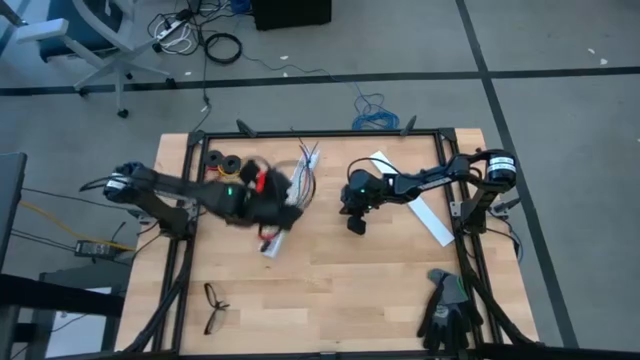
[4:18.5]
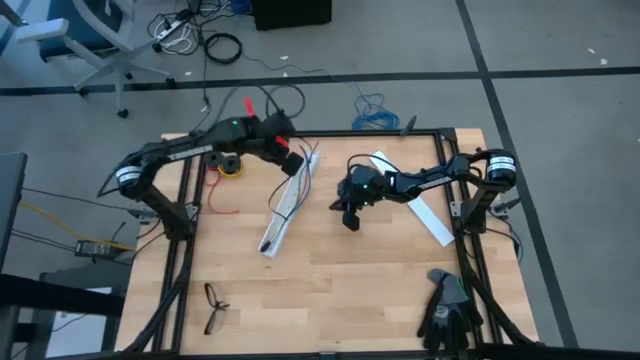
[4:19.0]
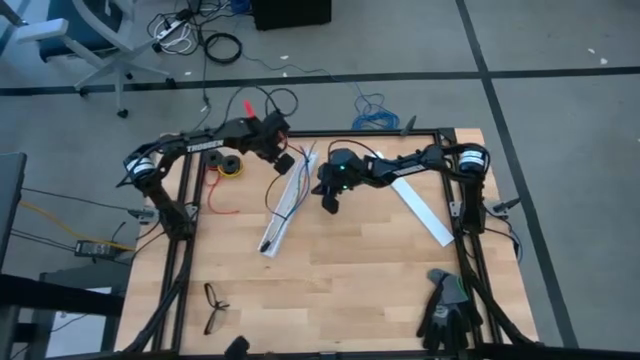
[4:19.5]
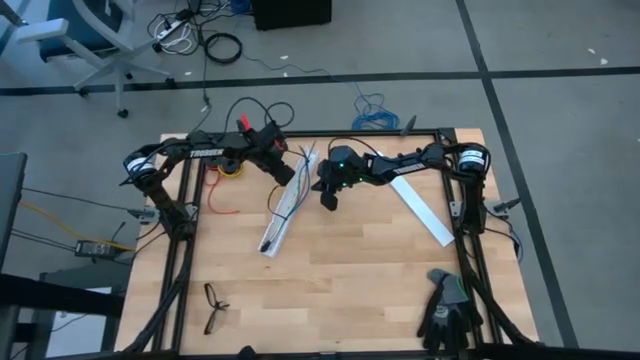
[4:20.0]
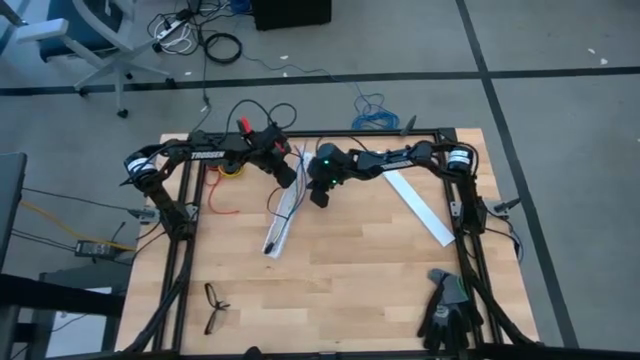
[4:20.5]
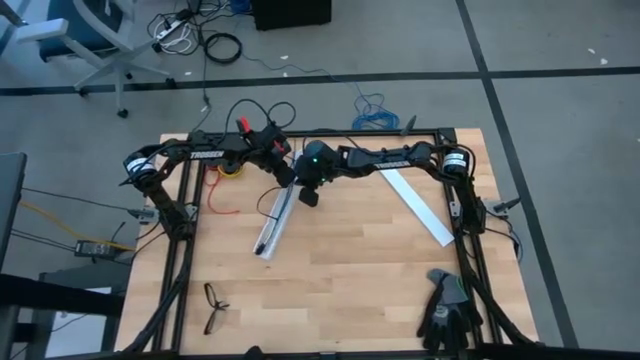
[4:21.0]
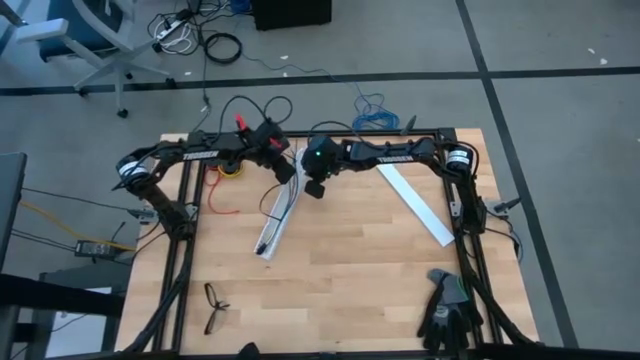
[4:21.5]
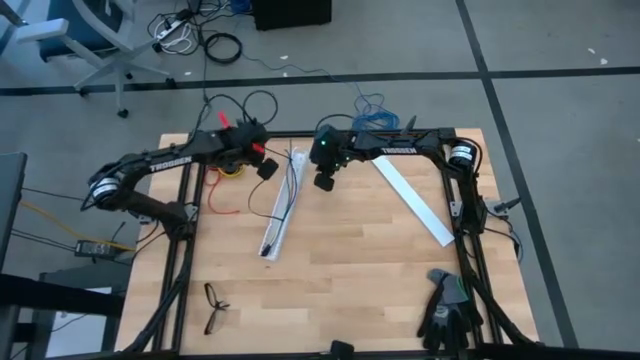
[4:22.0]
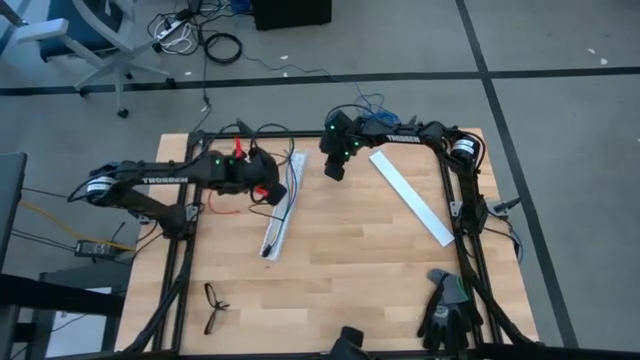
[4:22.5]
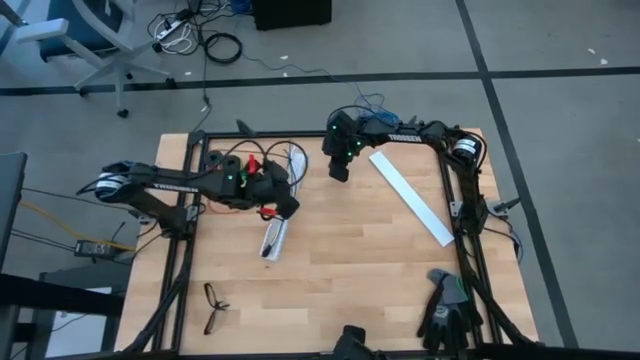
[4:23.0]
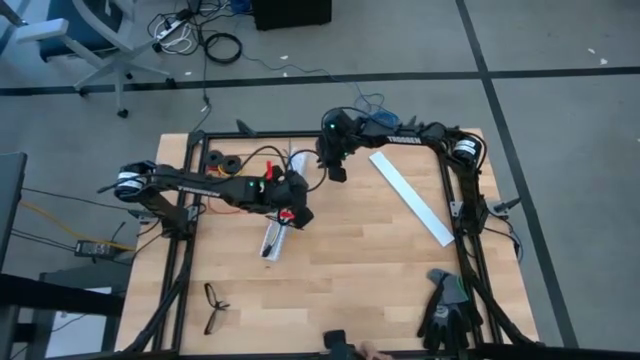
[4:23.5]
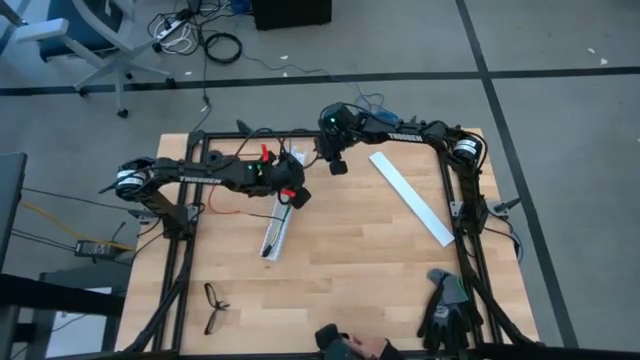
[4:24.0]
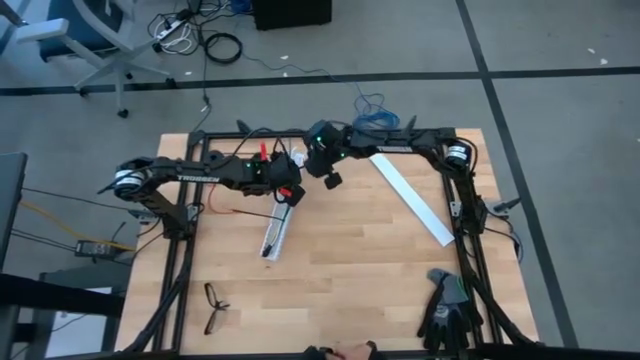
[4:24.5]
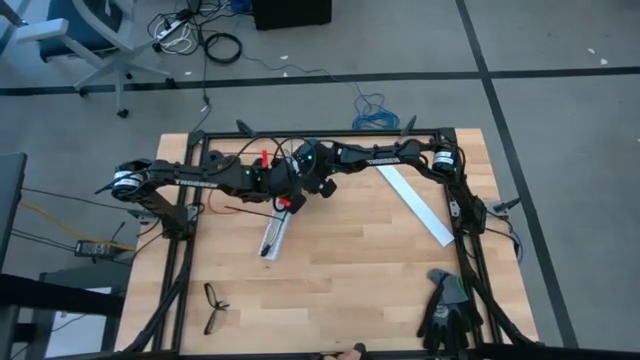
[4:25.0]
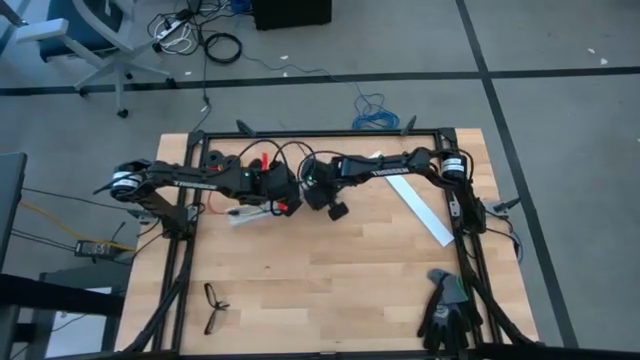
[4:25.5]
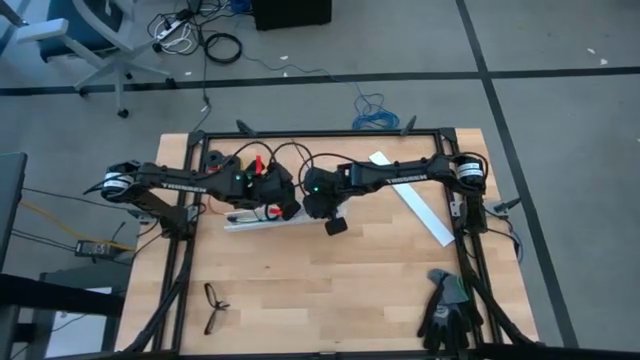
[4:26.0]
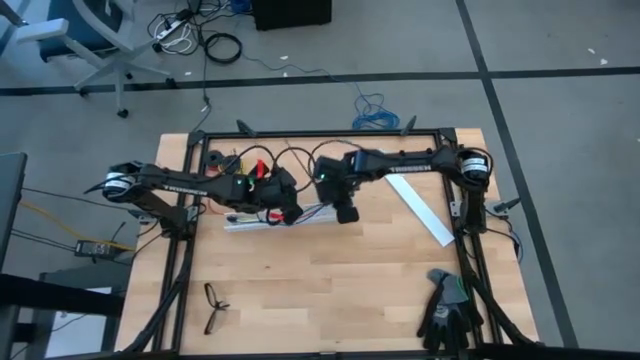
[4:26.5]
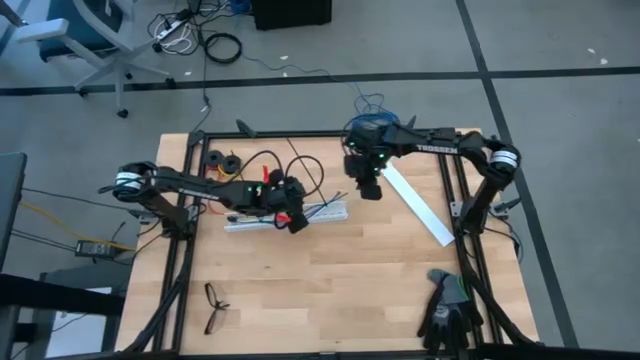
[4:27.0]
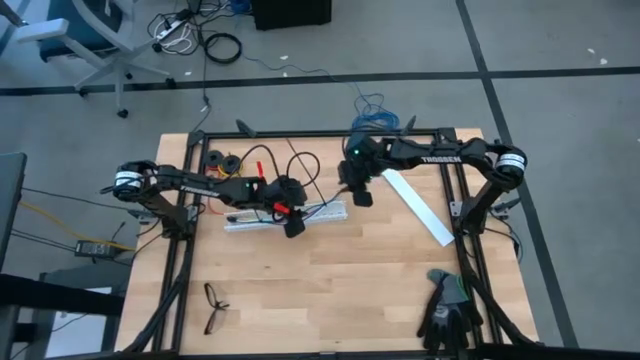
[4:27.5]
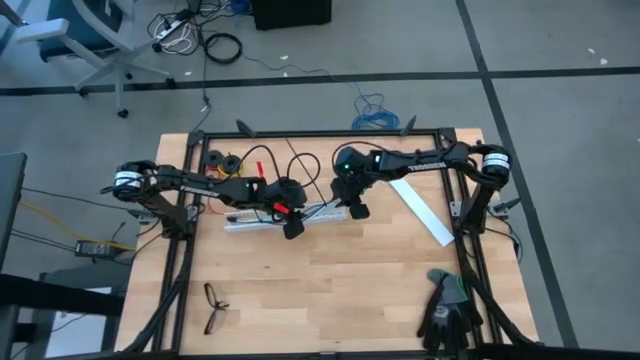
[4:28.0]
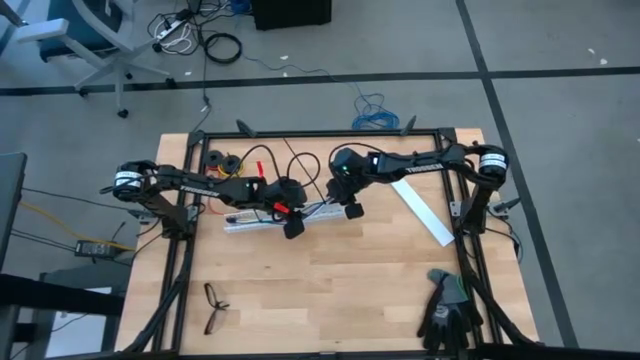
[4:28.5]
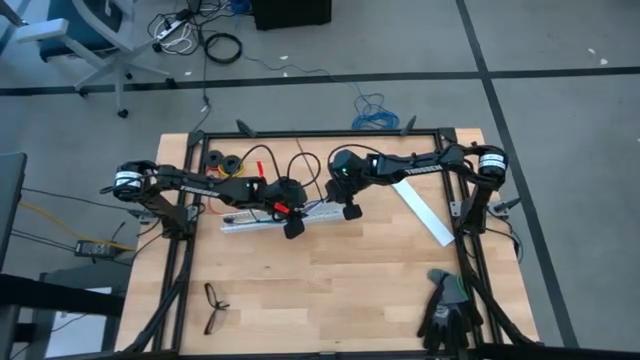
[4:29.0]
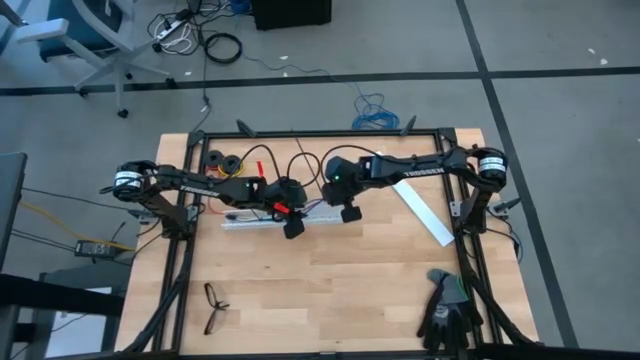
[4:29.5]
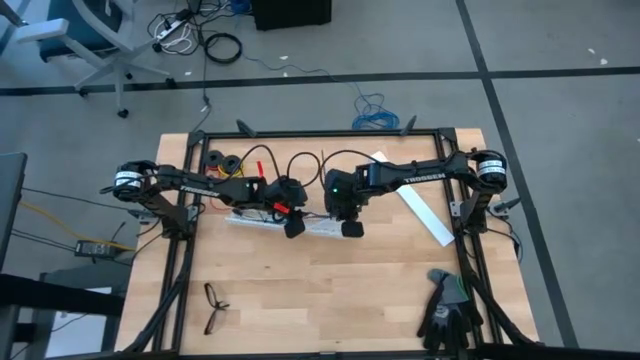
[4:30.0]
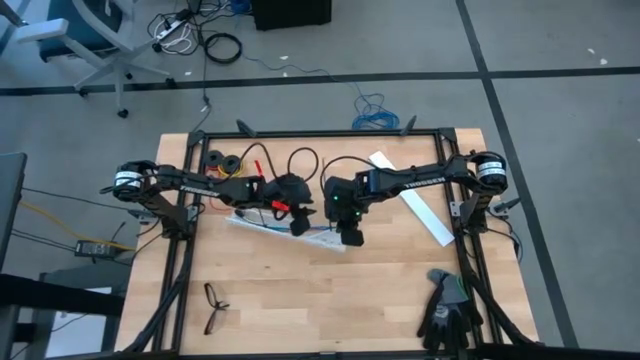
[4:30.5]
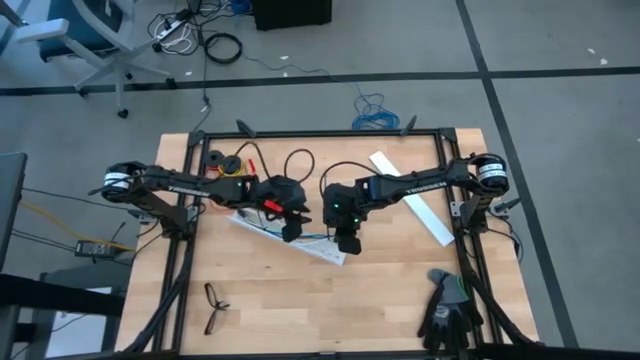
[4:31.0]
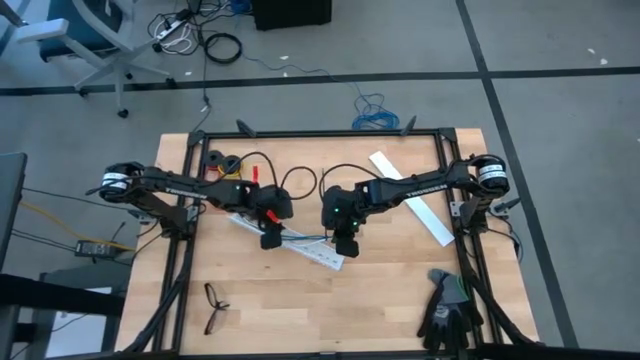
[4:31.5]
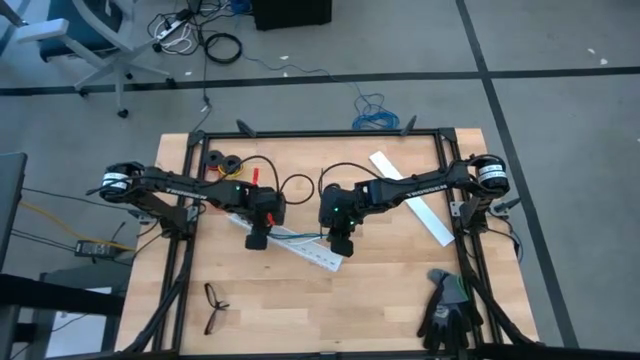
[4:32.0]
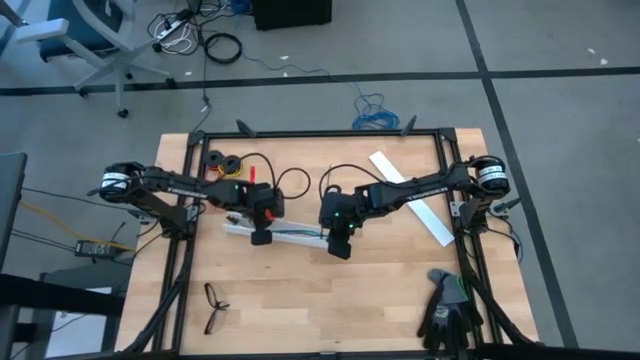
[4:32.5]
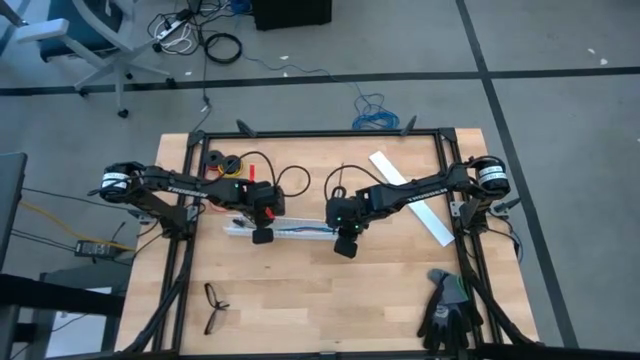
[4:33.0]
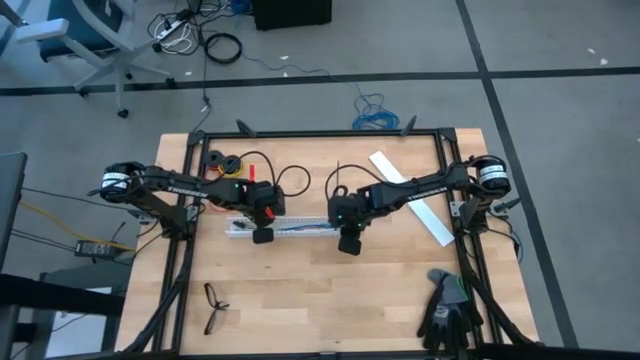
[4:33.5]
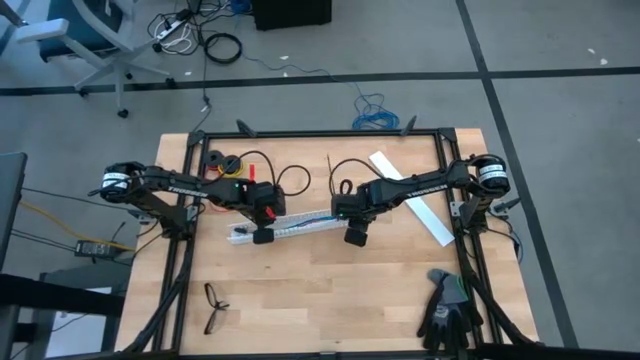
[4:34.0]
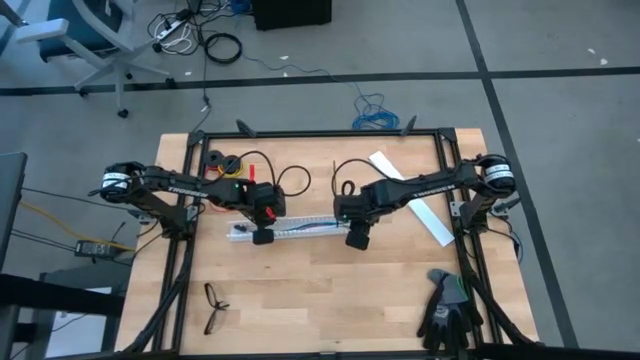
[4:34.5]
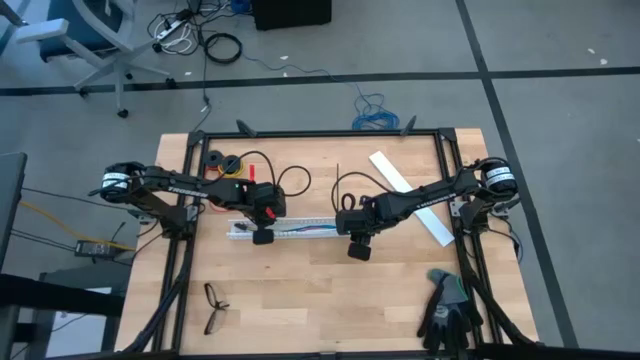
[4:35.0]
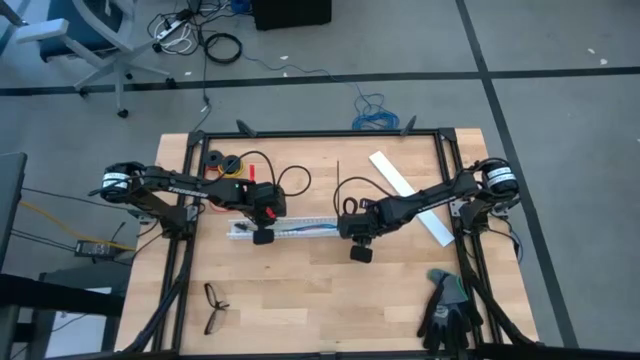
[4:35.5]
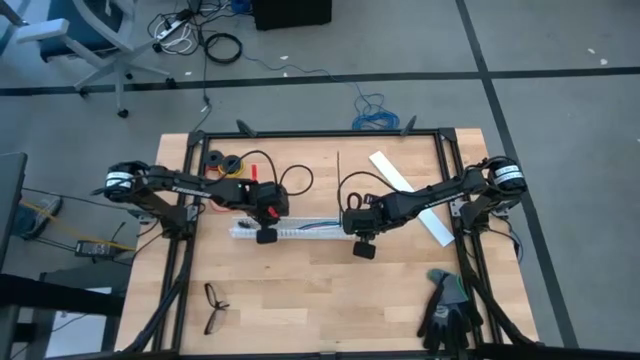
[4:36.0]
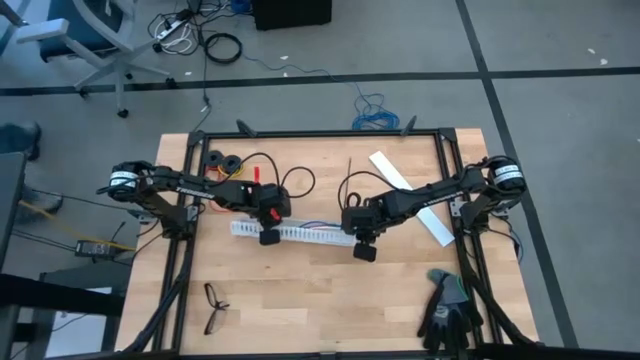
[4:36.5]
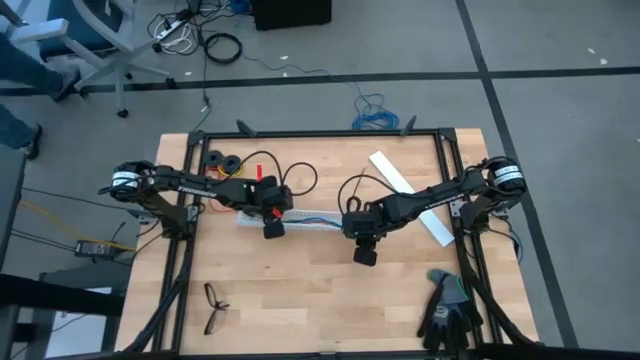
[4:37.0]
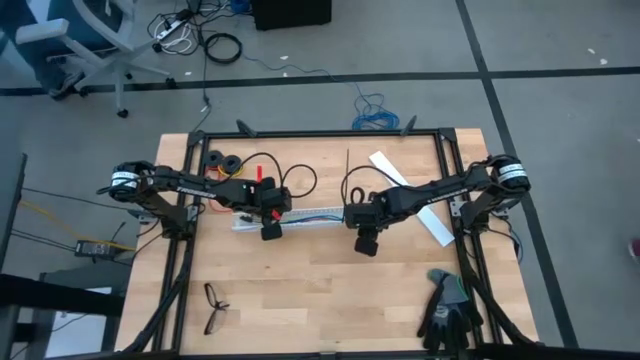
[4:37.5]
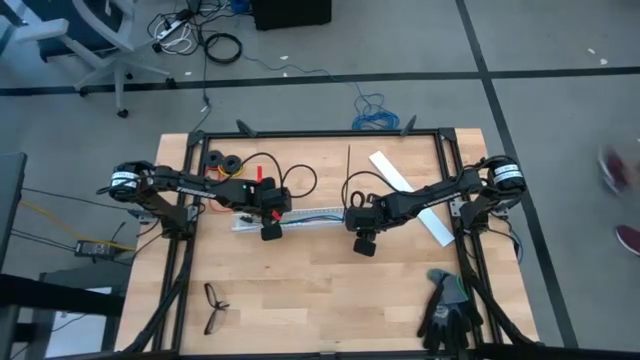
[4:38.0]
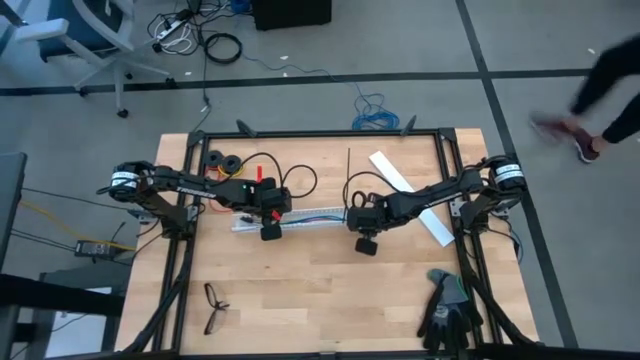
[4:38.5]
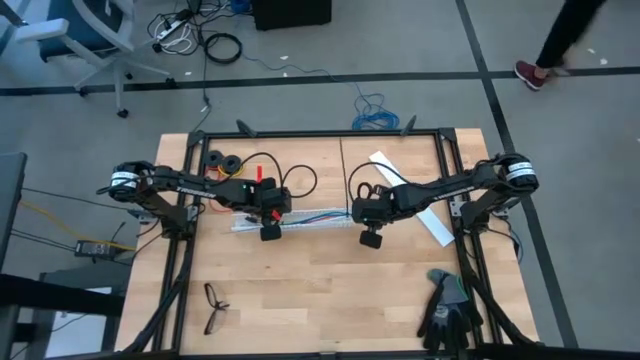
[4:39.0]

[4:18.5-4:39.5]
Task: Ziptie cables
Put the zip tied cable wires into the white cable duct
